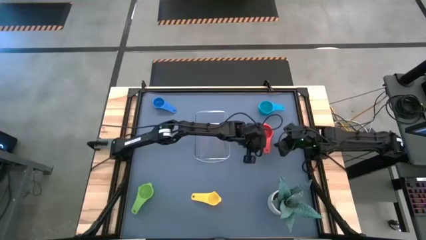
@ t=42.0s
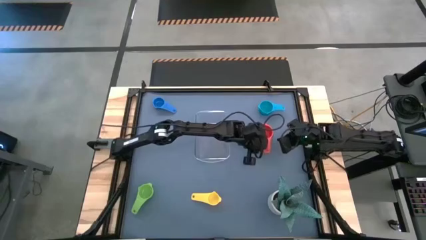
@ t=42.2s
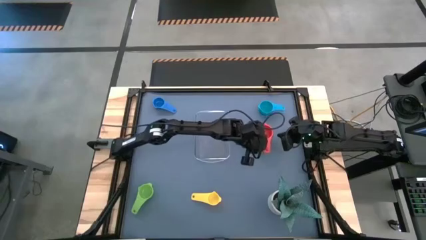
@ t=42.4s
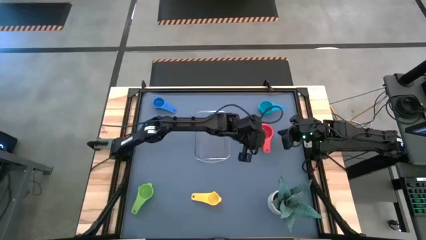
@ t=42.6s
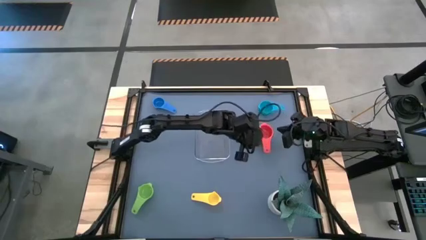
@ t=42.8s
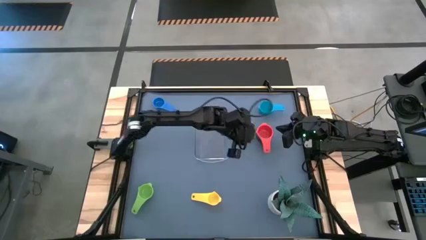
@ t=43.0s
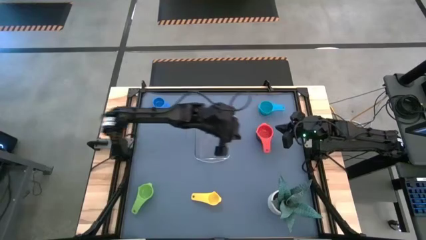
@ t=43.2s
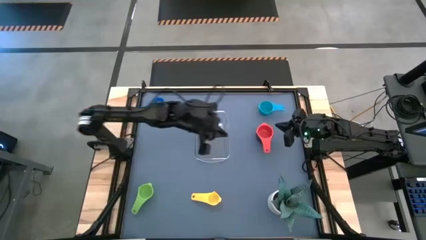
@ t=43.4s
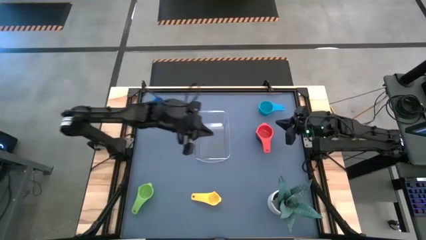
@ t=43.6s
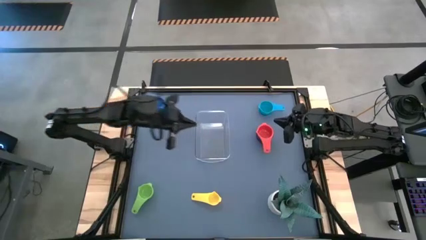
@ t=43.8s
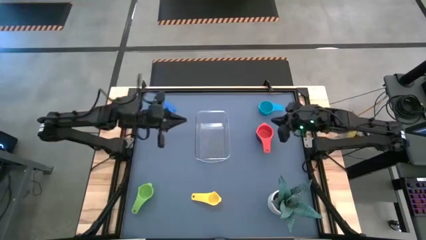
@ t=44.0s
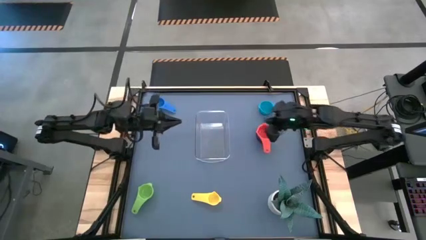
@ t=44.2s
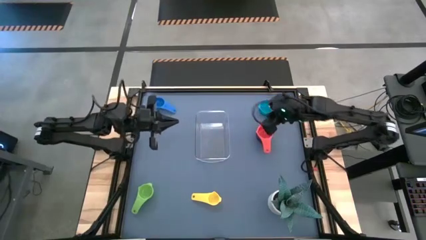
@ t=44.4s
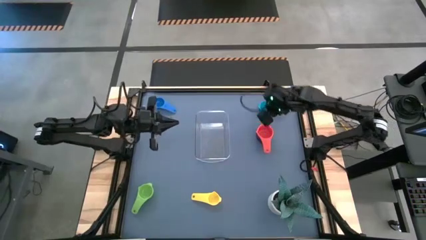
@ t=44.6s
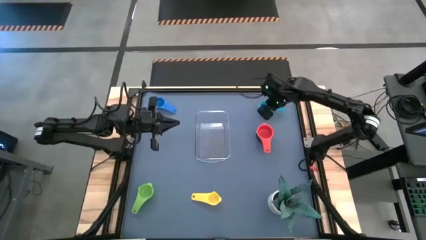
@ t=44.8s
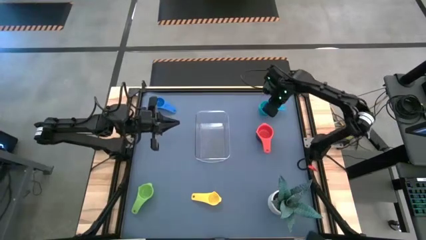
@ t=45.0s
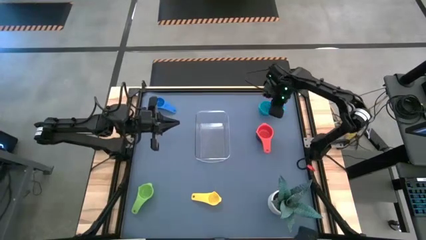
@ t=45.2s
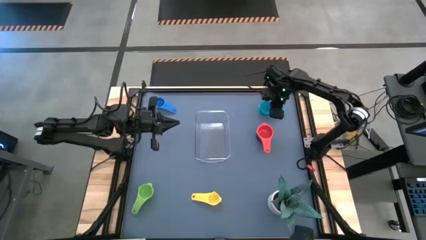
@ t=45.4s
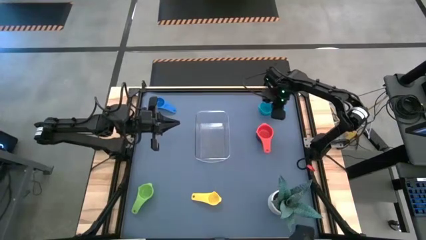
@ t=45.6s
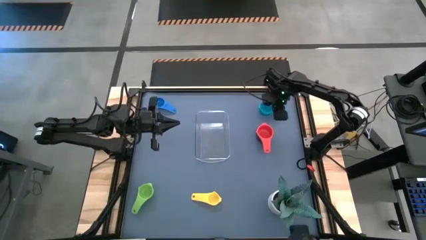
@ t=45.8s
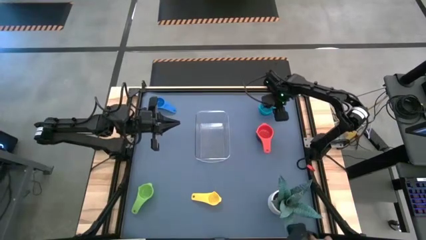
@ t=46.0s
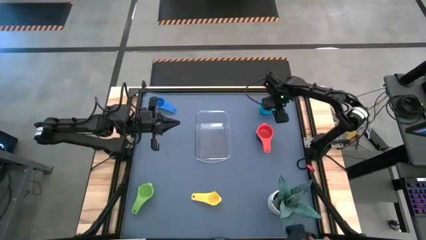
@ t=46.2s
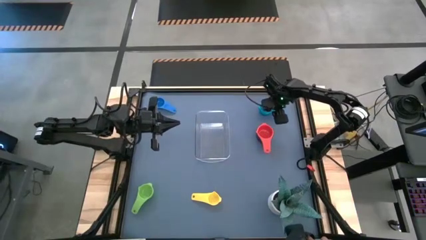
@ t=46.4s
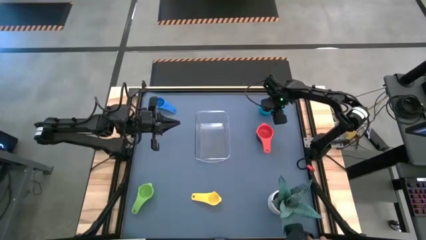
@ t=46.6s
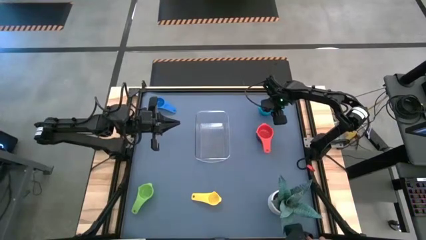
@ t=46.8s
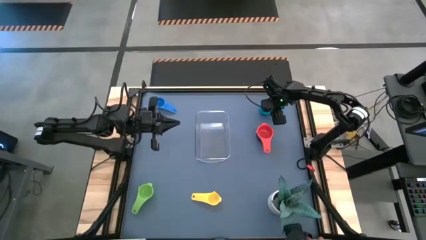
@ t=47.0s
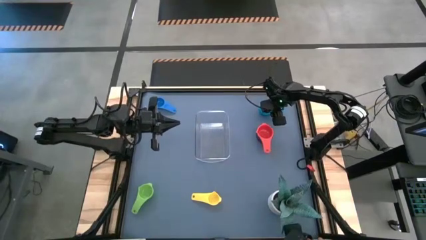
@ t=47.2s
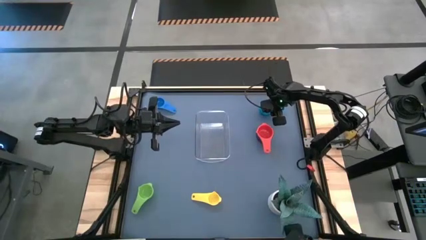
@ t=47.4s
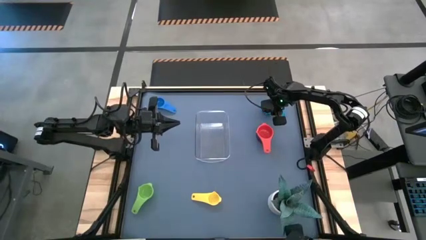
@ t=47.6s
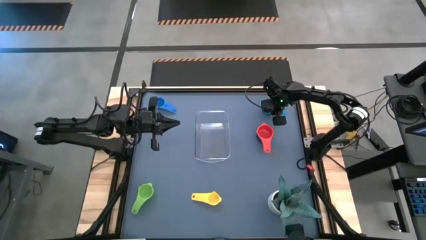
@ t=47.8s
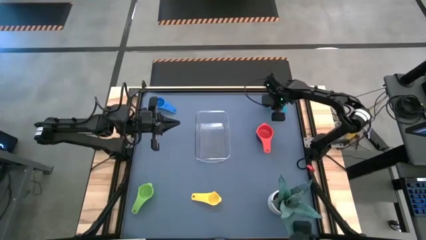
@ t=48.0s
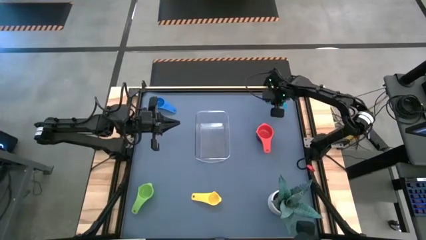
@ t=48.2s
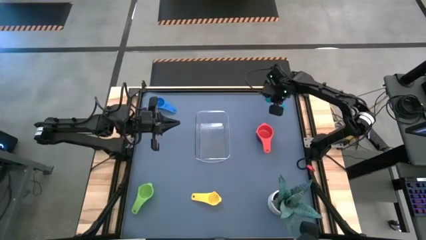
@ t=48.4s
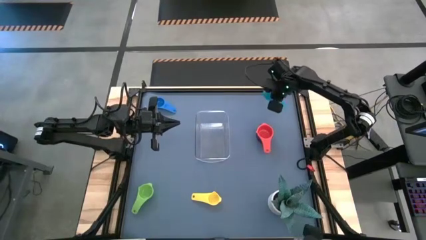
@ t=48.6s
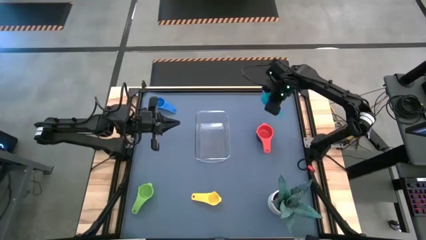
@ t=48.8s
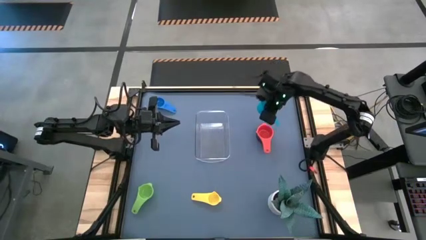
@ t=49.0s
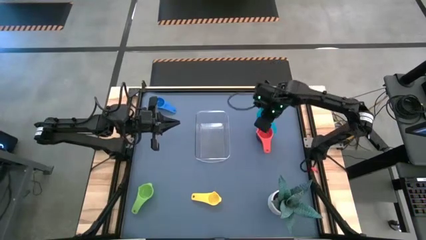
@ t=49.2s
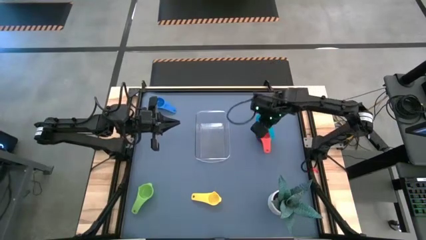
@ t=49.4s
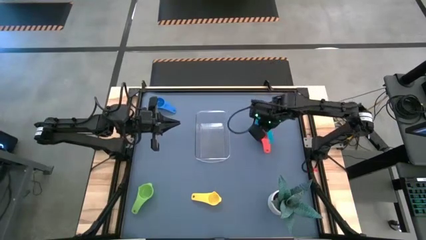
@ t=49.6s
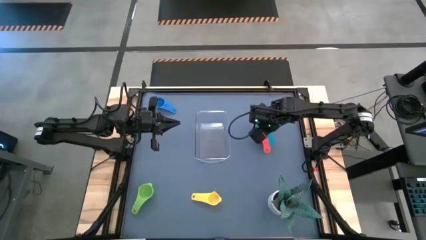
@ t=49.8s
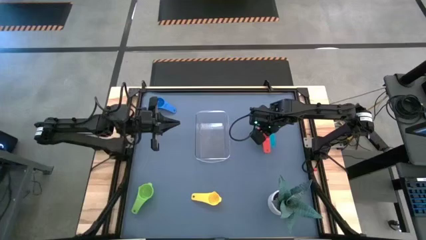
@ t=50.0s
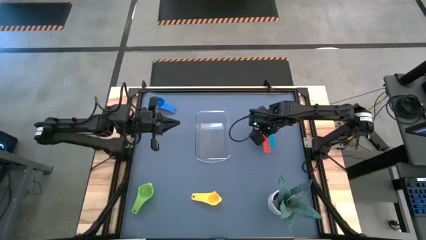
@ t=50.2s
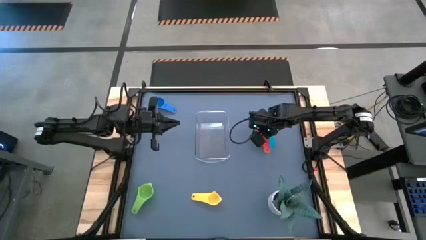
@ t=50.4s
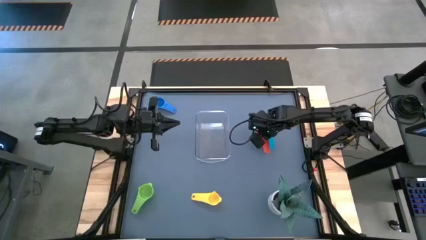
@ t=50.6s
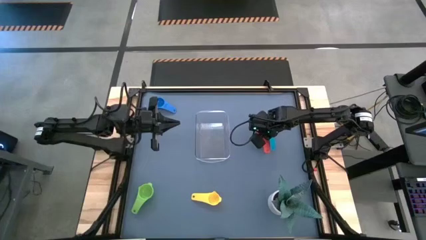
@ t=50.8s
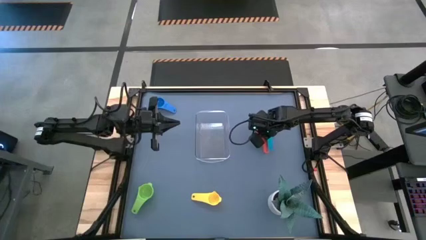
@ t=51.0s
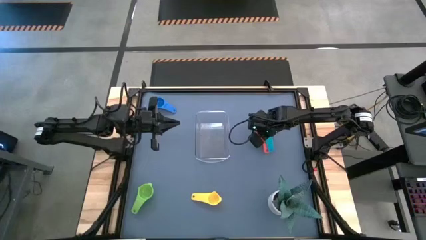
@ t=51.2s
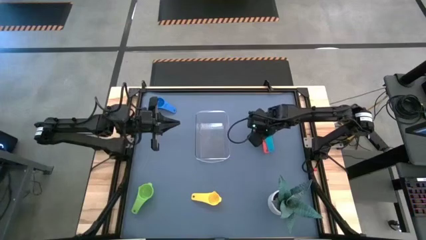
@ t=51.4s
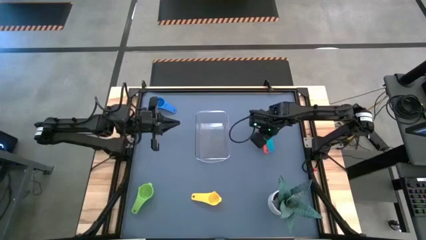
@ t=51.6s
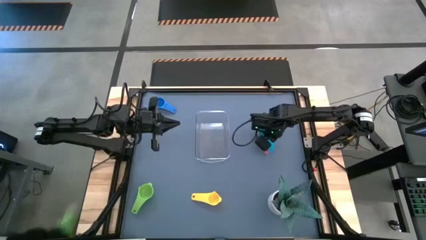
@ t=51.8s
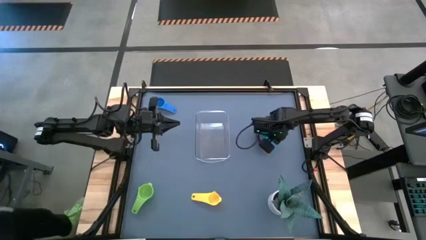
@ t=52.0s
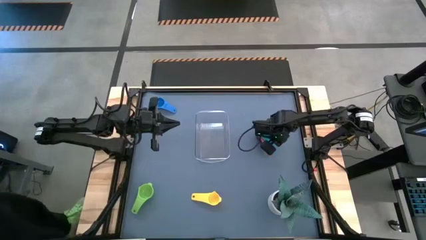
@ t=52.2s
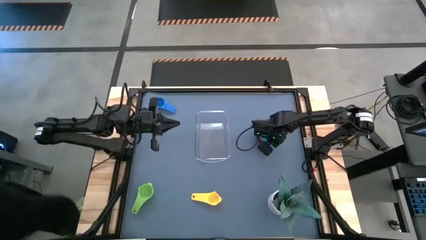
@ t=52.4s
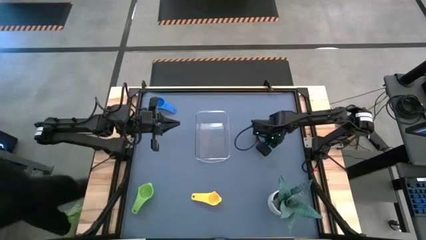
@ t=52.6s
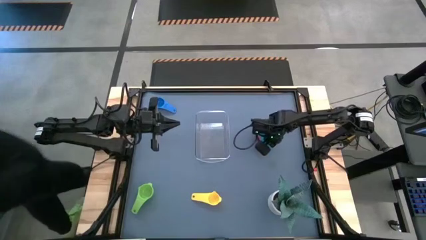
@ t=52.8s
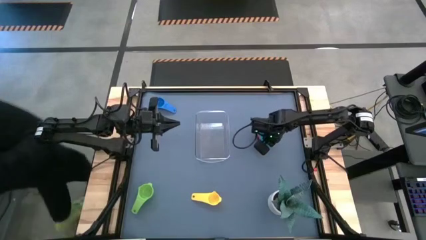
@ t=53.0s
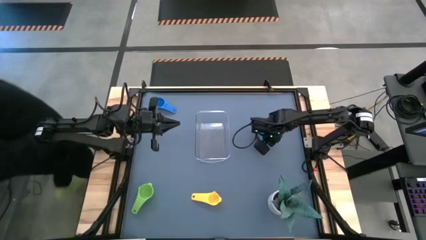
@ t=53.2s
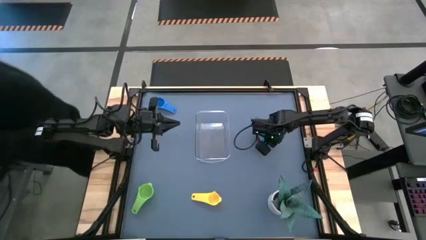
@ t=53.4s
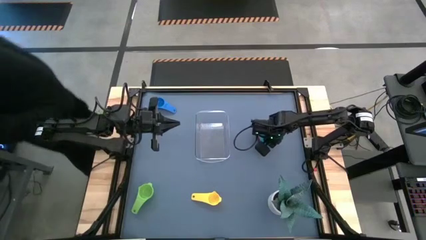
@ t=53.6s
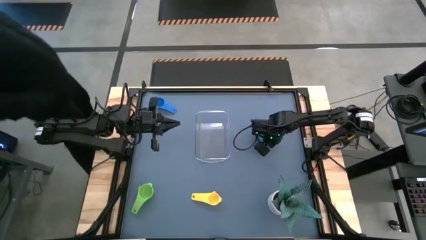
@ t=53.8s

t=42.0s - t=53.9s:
Task: Nest measuring cups in basket
Stack the light blue measuring cup on top of the red measuring cup
